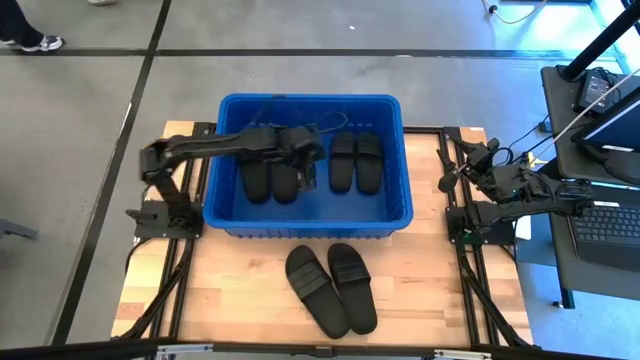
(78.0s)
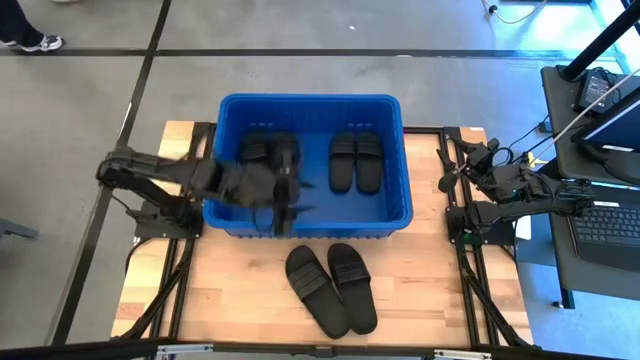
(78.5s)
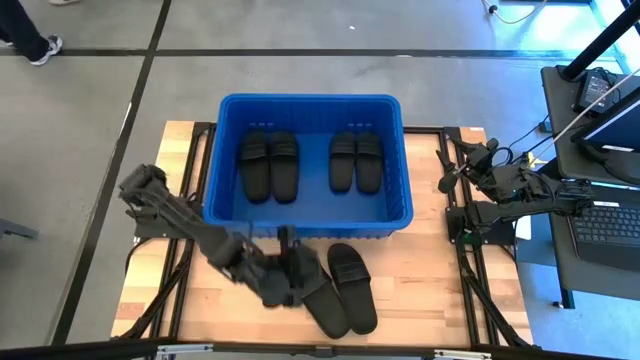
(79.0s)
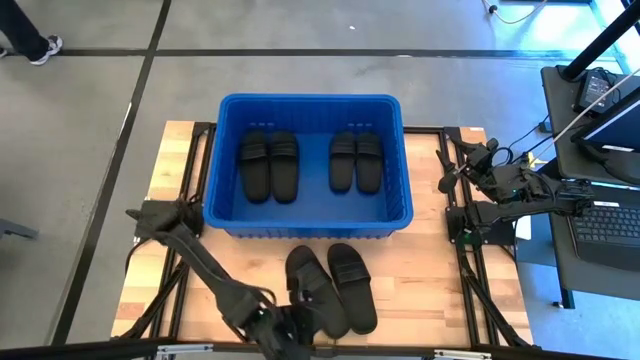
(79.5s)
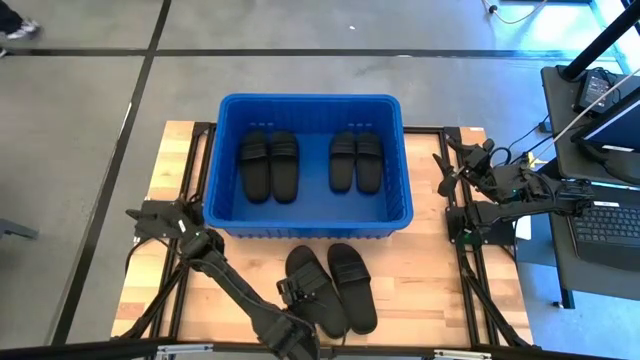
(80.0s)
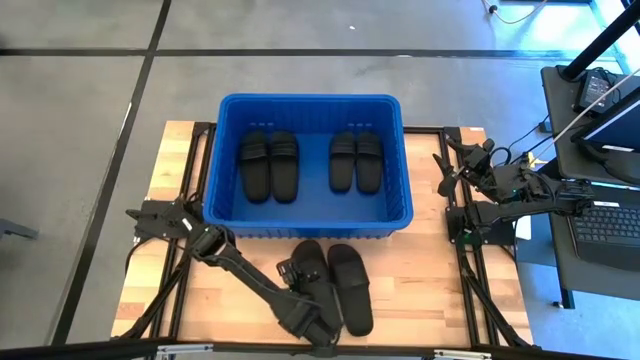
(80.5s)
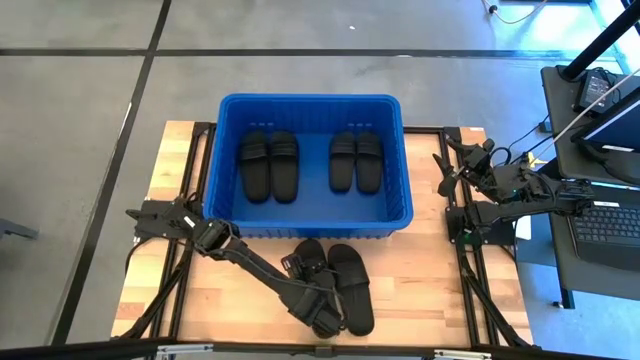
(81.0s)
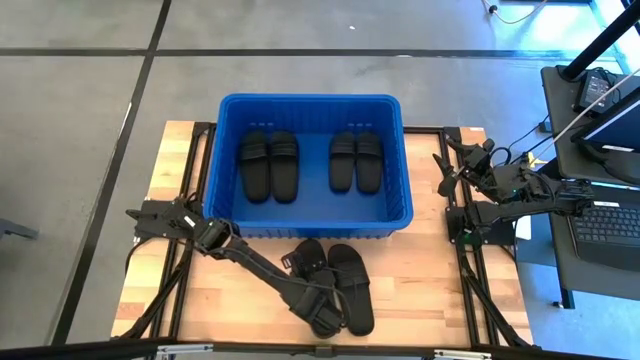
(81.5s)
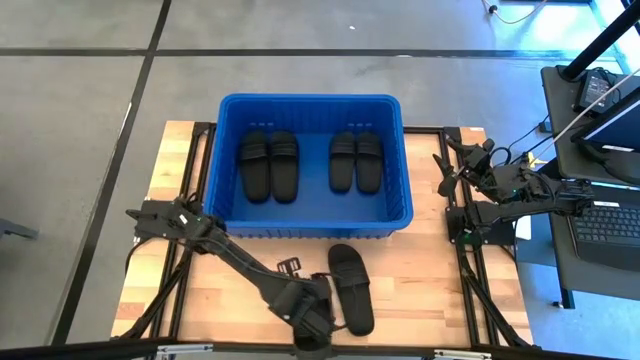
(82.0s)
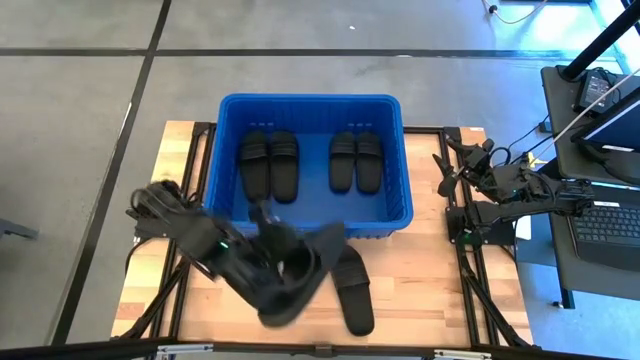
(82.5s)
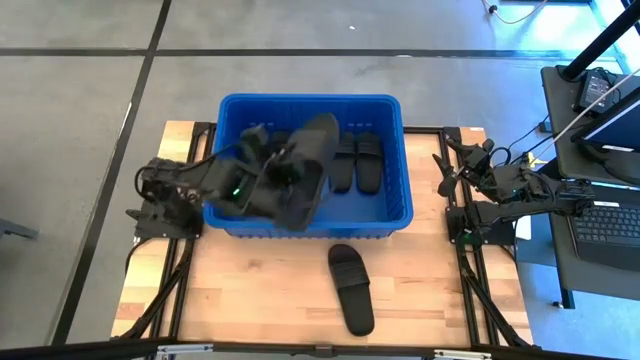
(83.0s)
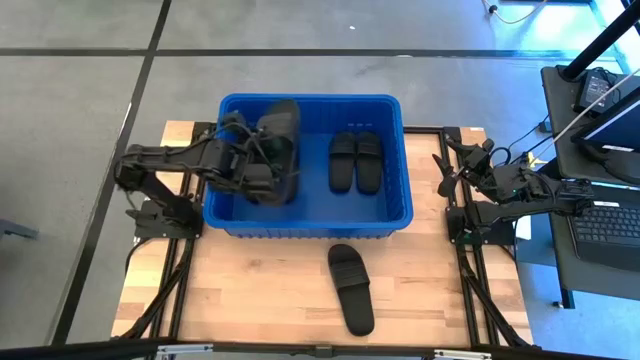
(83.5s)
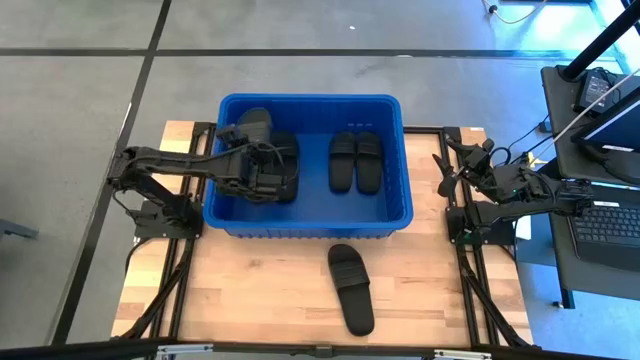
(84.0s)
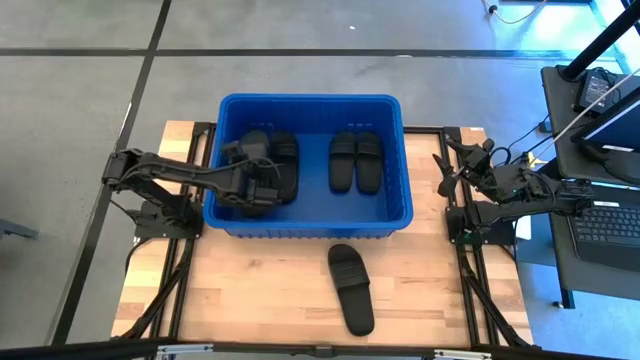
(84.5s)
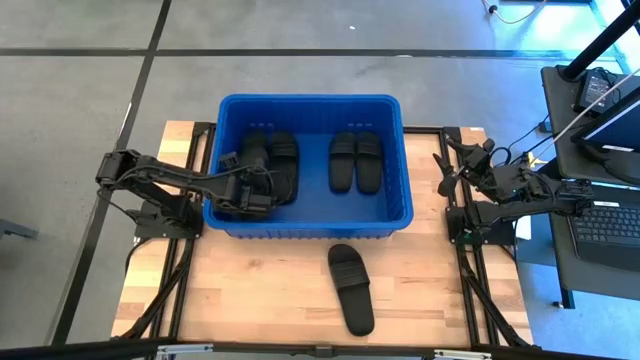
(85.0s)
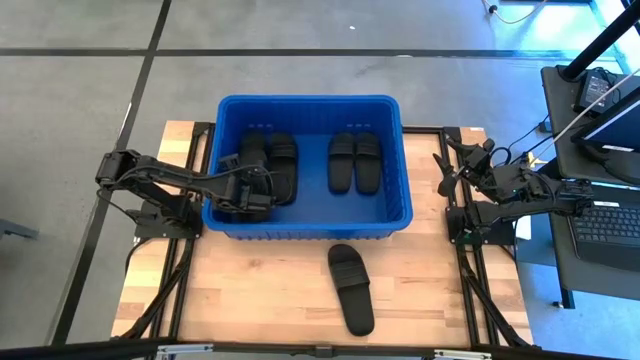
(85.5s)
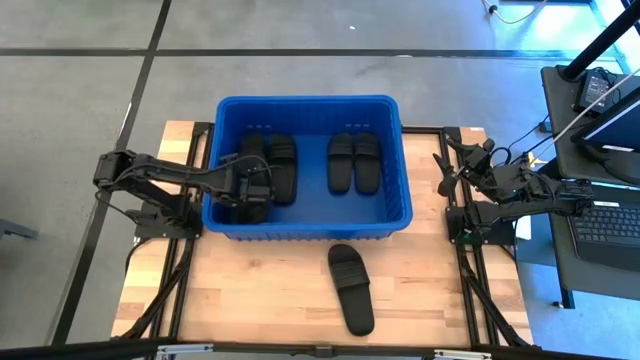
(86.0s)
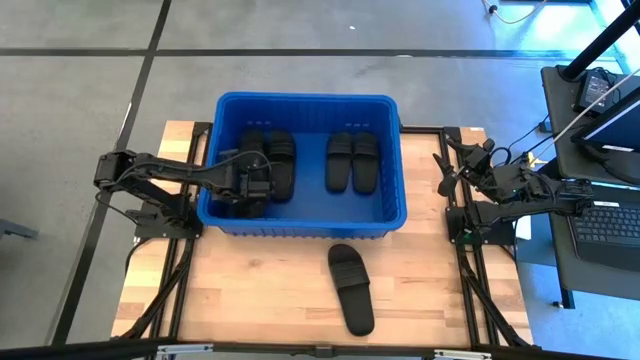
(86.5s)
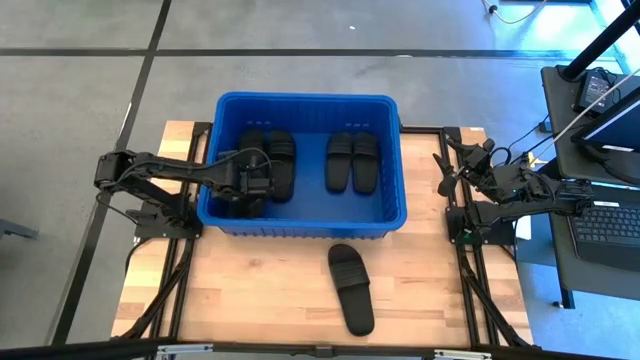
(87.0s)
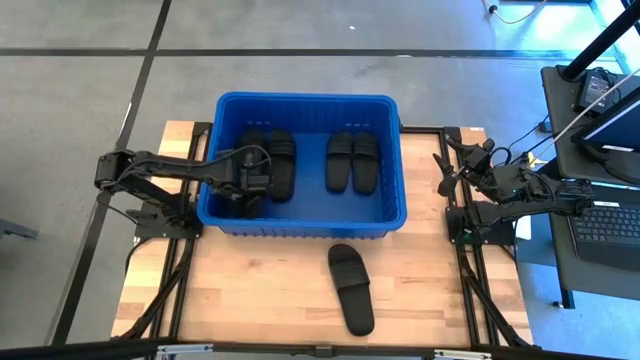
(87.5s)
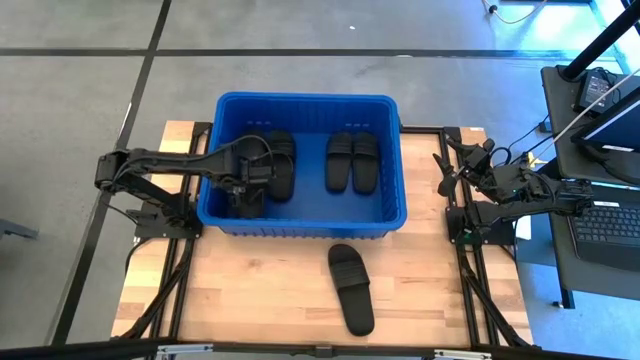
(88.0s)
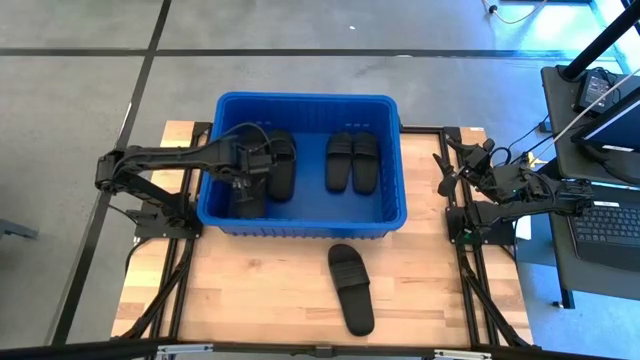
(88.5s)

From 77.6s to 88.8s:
Task: Pick and place slides into bin
Put the black slide into the blue organizer bin

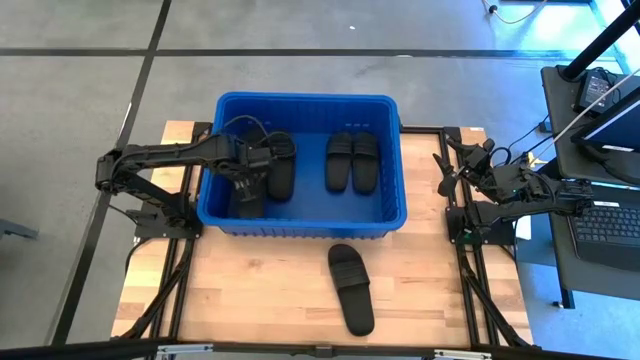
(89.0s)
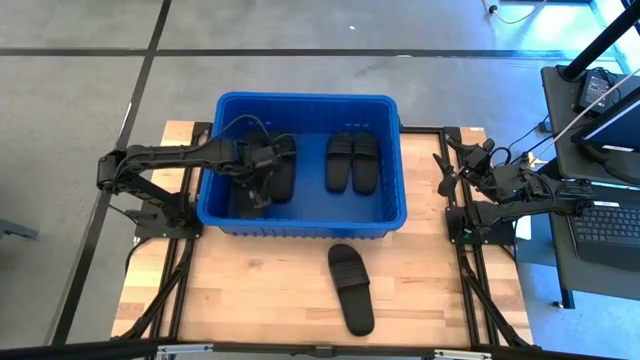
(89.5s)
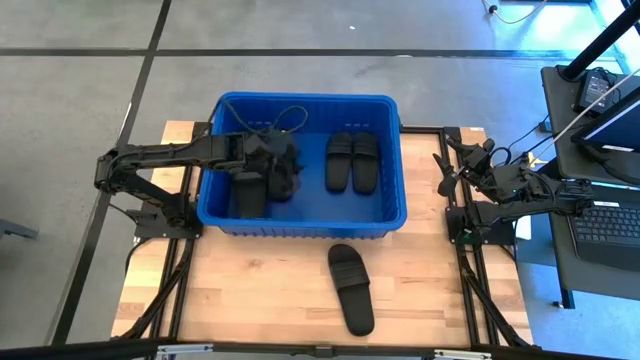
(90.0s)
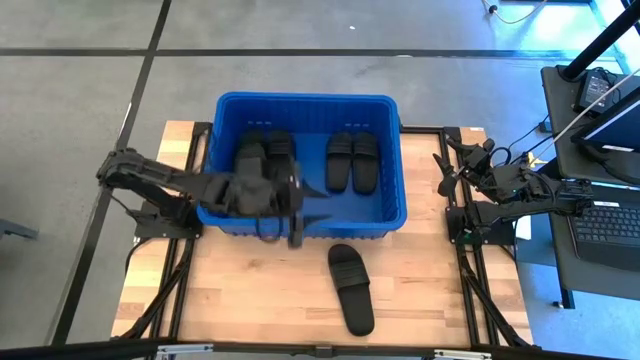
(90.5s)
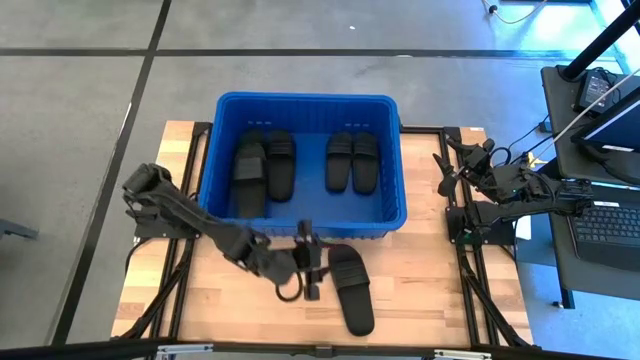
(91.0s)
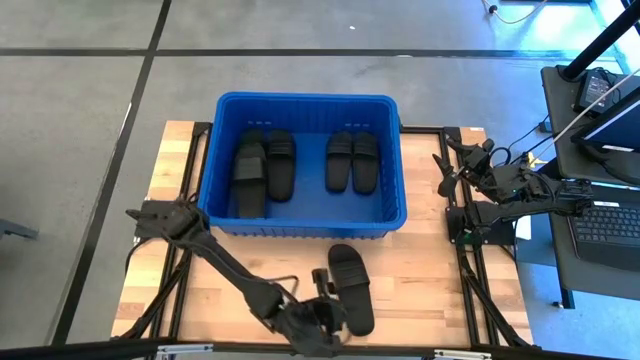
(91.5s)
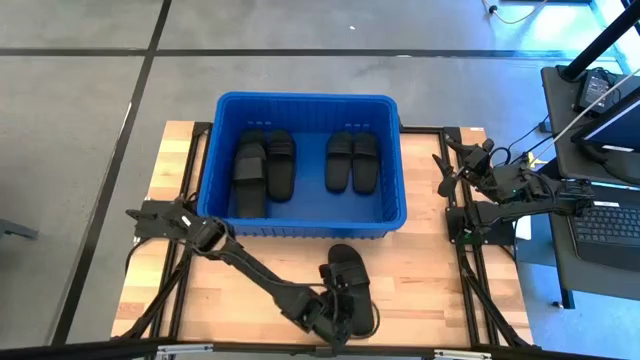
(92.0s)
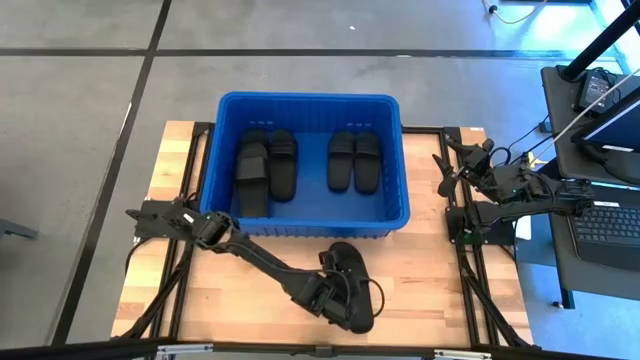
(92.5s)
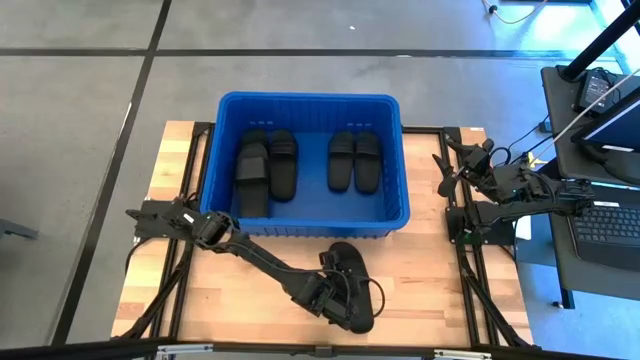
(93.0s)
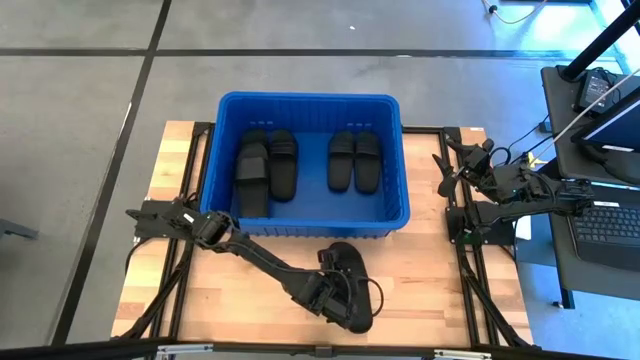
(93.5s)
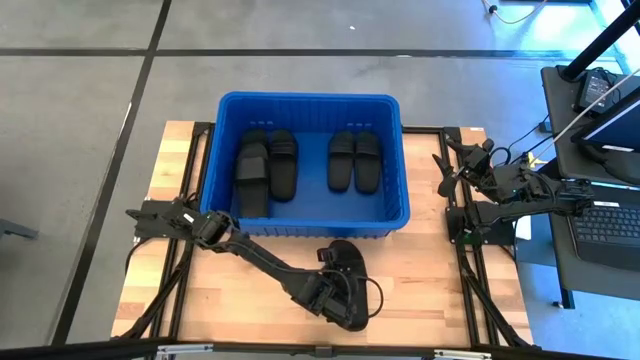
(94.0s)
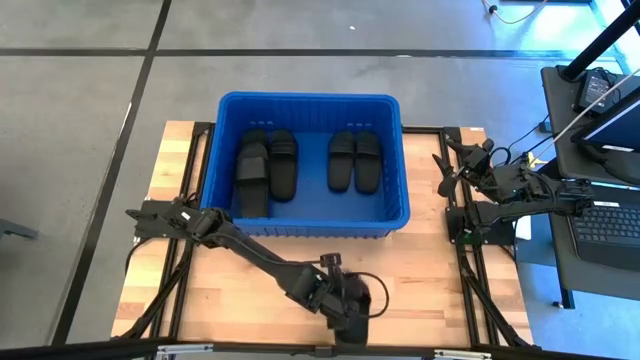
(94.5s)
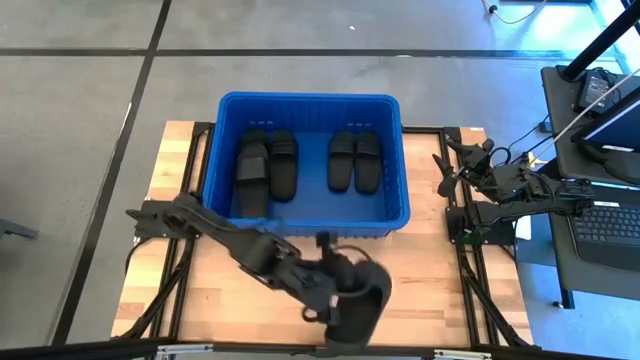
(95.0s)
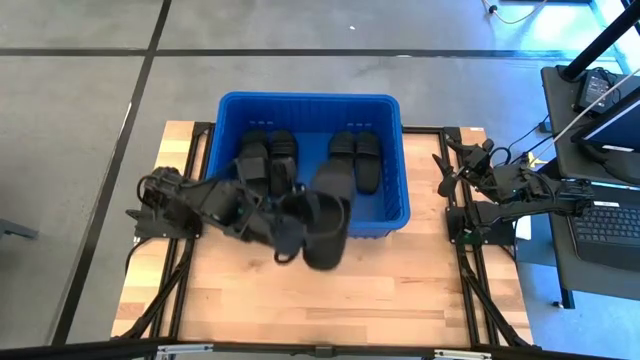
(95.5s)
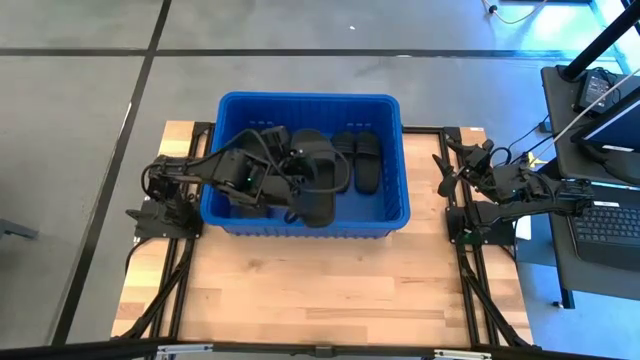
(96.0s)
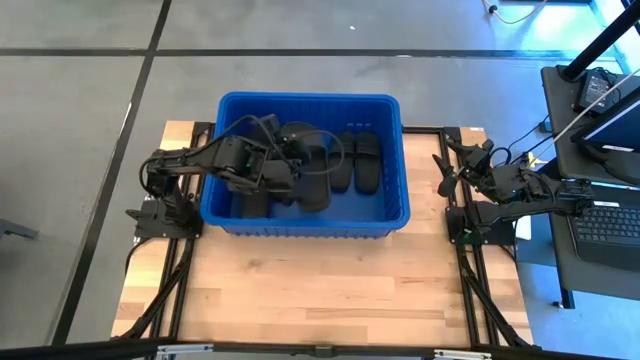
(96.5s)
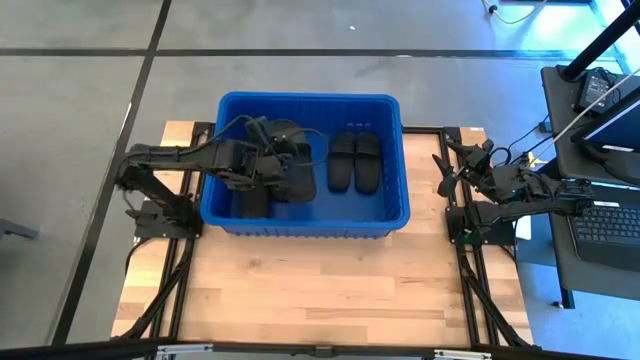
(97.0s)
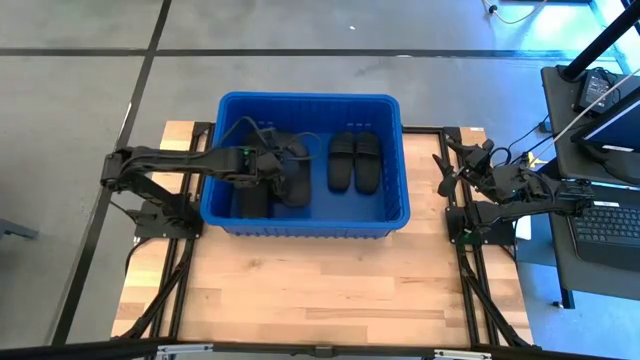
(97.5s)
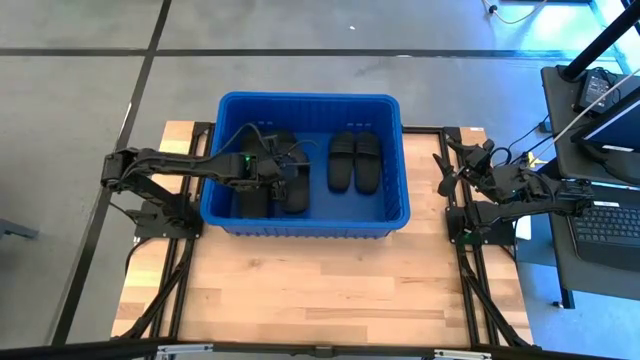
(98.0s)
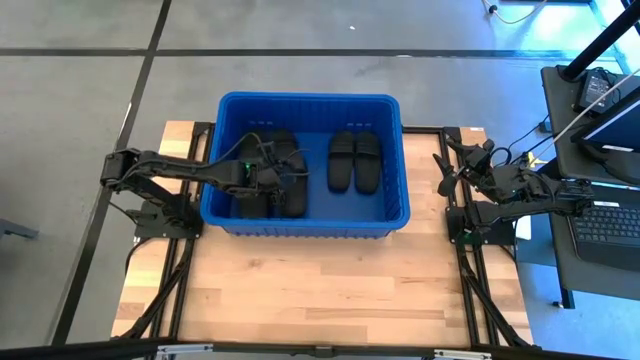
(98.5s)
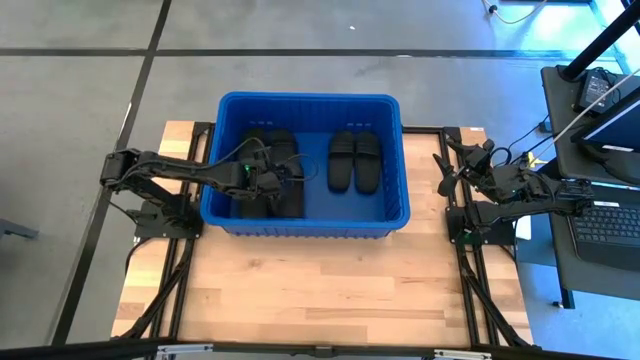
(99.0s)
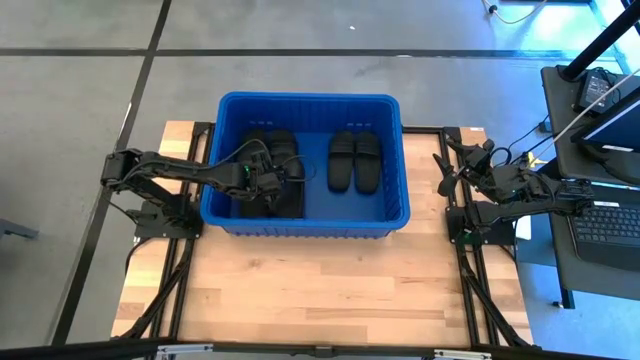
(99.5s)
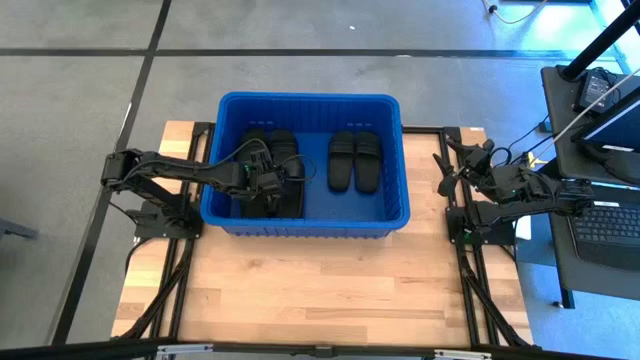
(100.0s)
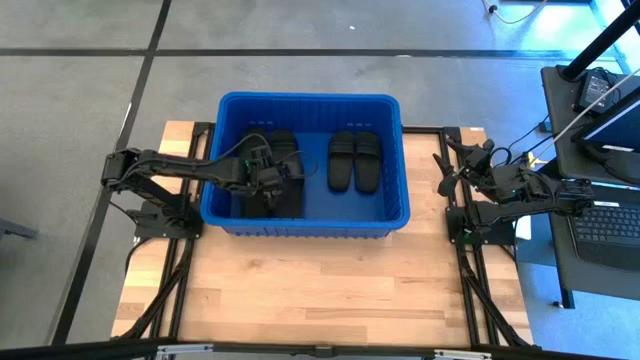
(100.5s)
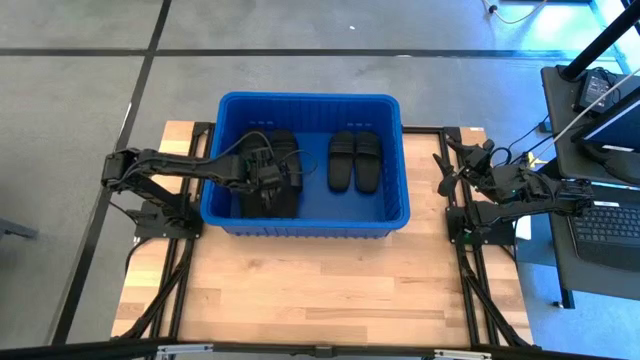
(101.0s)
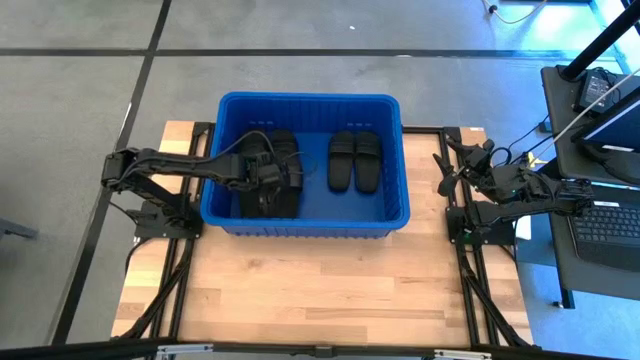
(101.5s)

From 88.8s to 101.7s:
Put the black slide into the blue organizer bin
